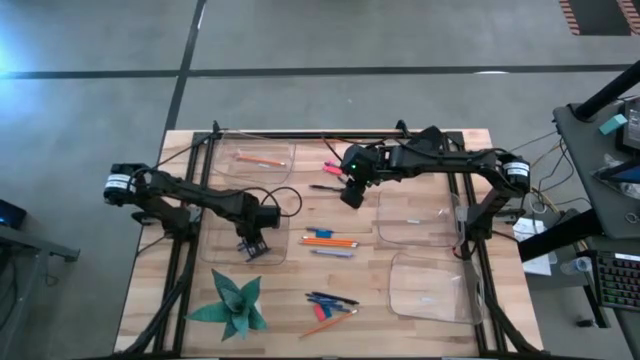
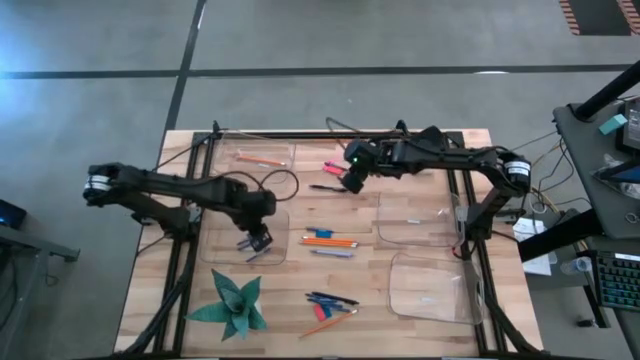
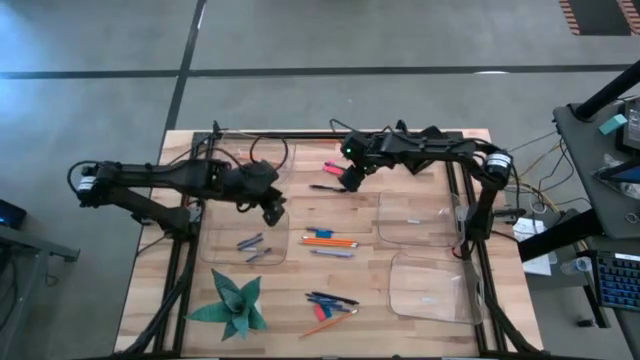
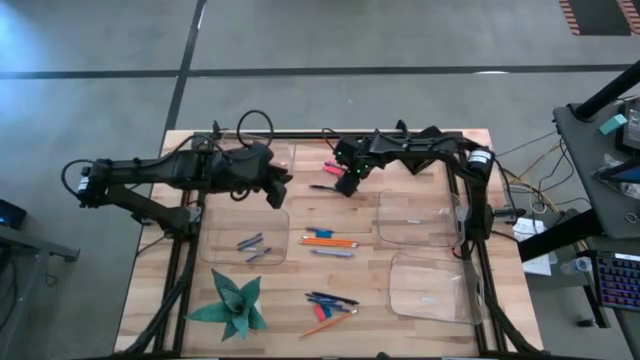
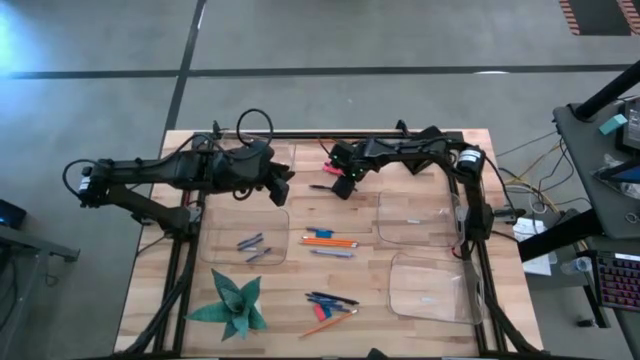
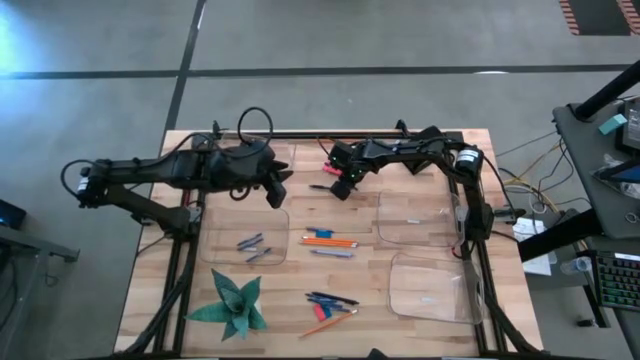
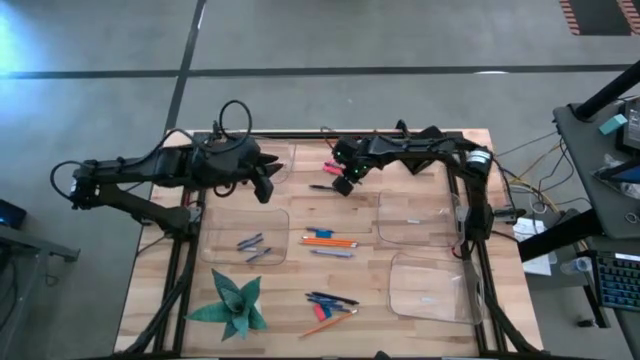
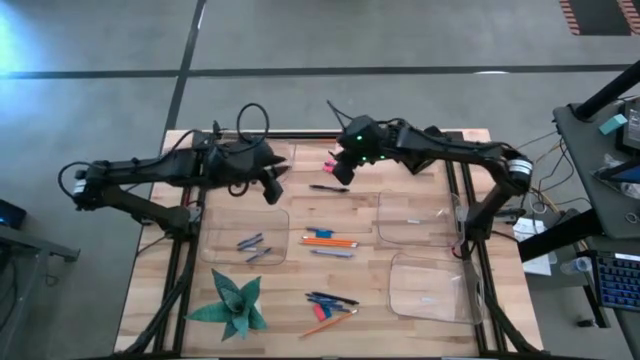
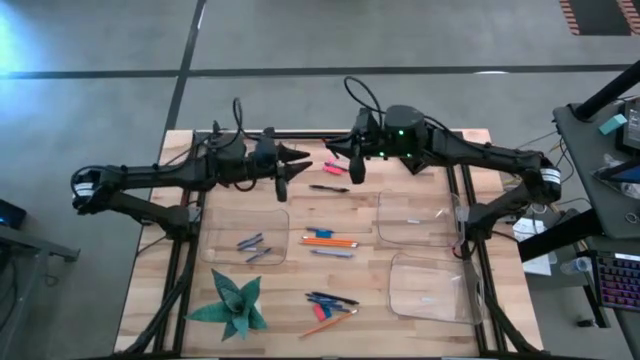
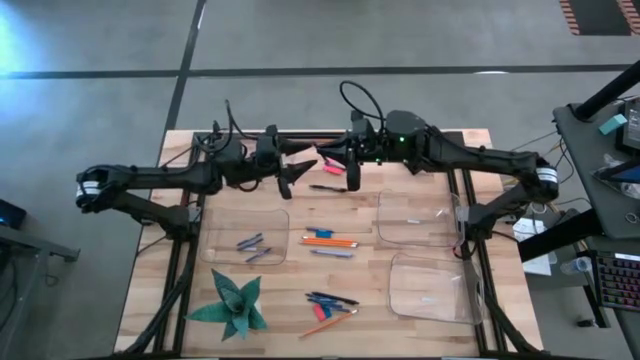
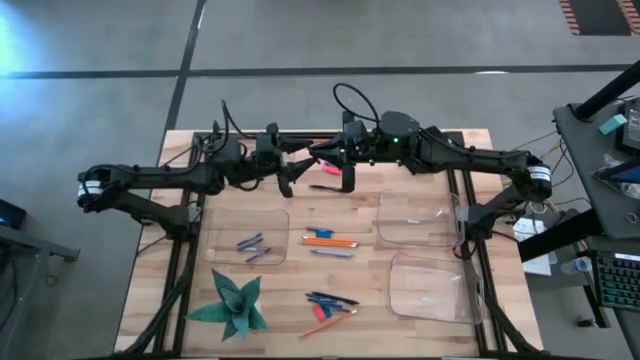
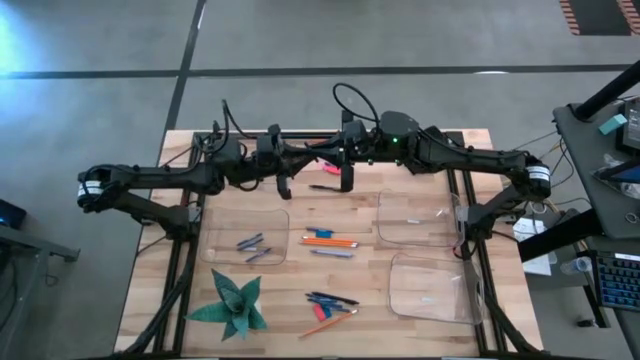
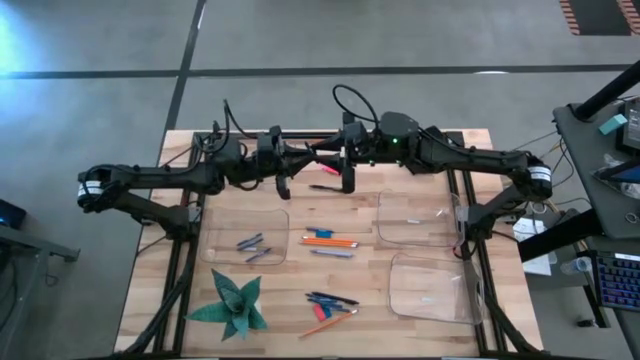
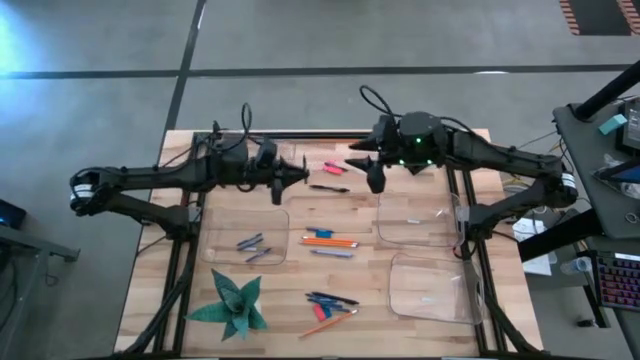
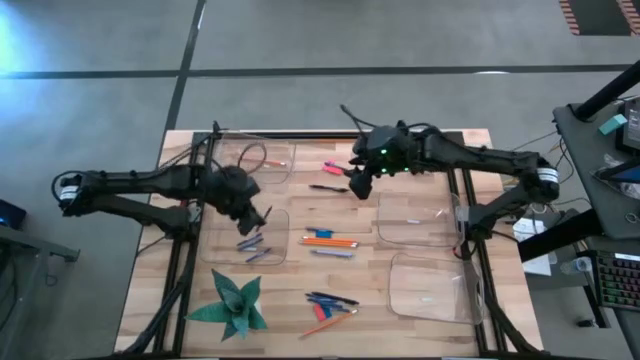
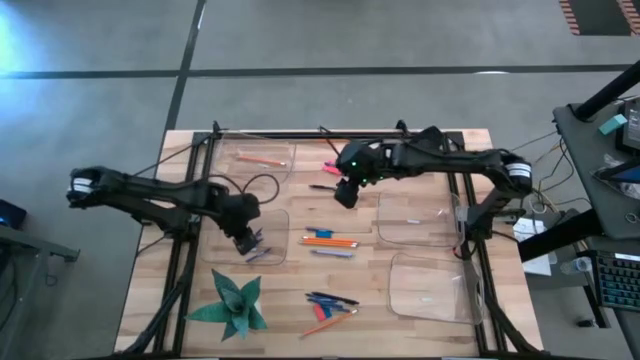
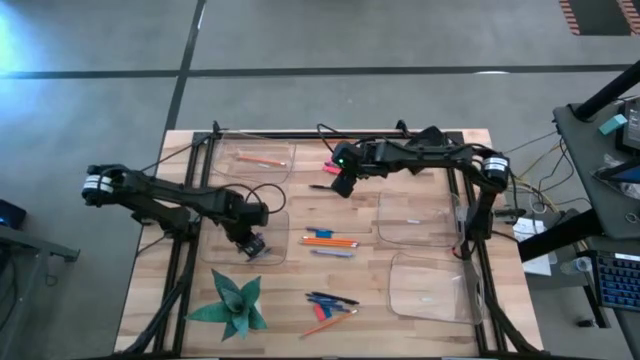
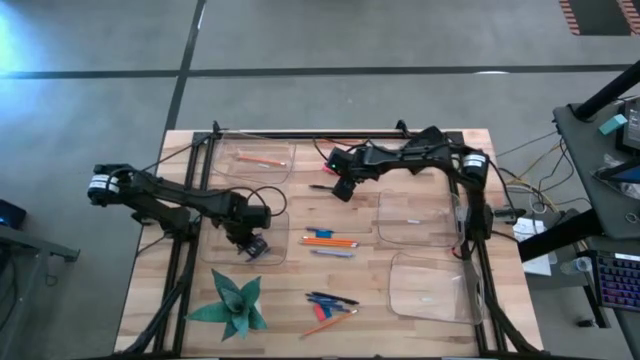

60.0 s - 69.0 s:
Task: Sort crayons/erasers/pens/pencils in bins
Put the blue crayon into the middle left transparent bin

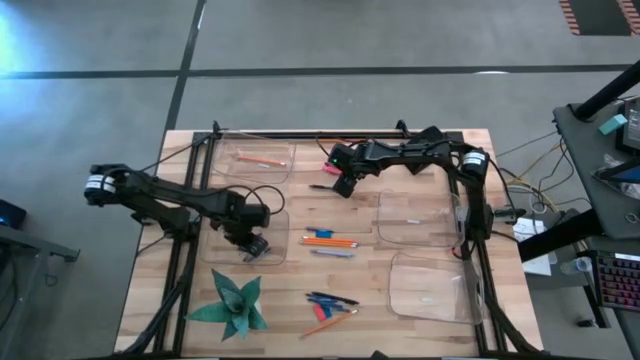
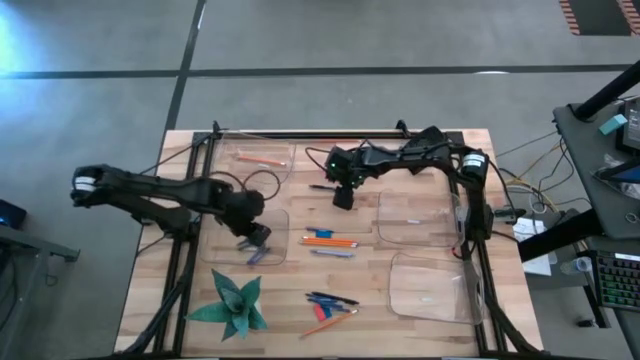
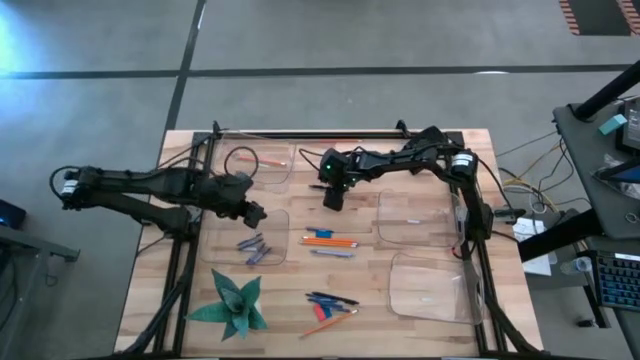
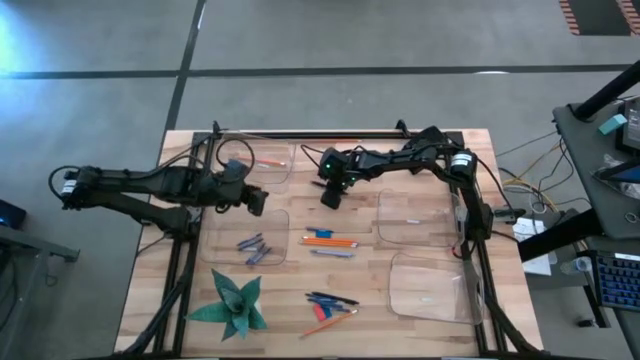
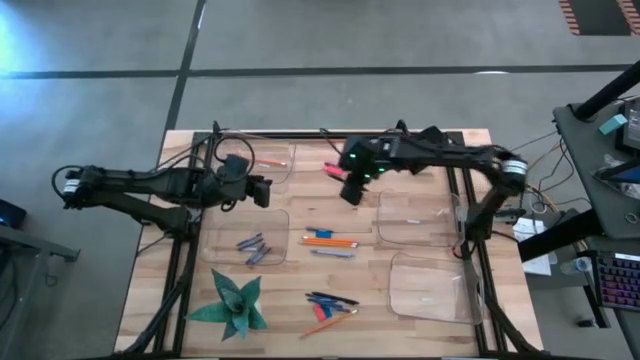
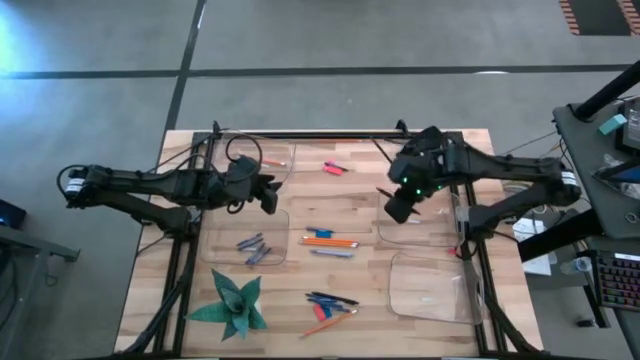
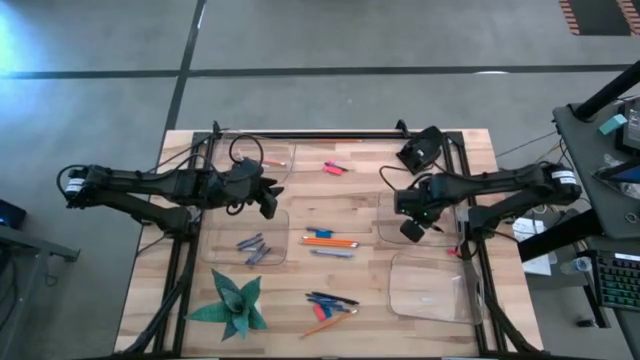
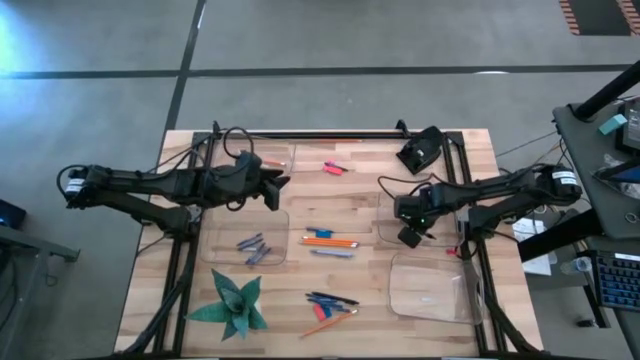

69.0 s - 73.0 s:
Put the black pen into the middle right transparent bin

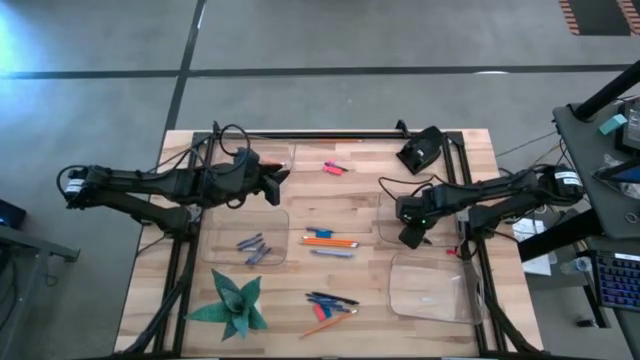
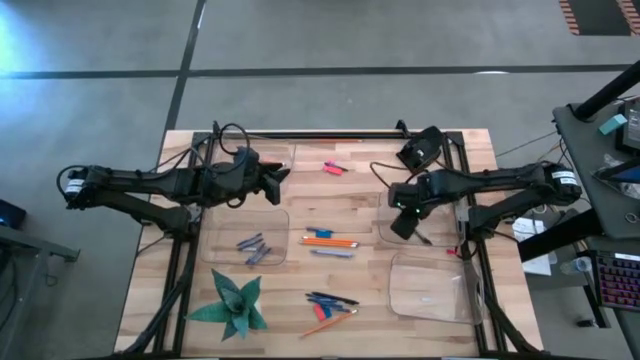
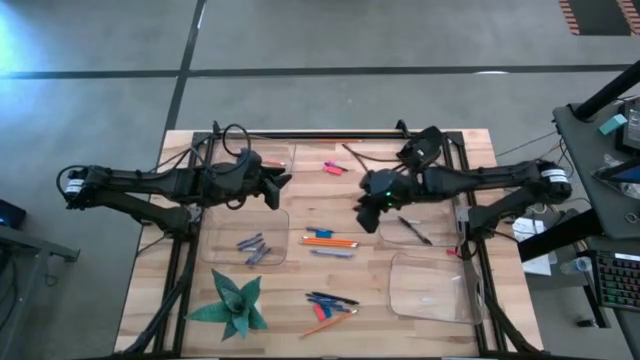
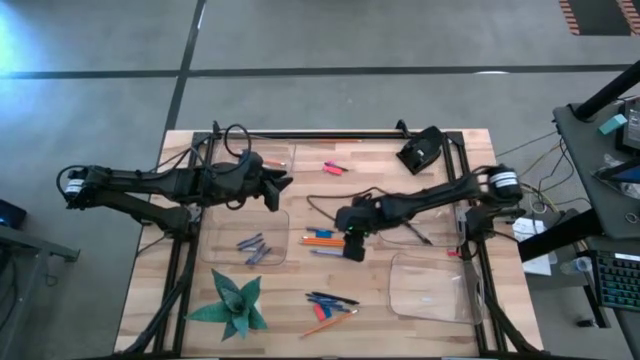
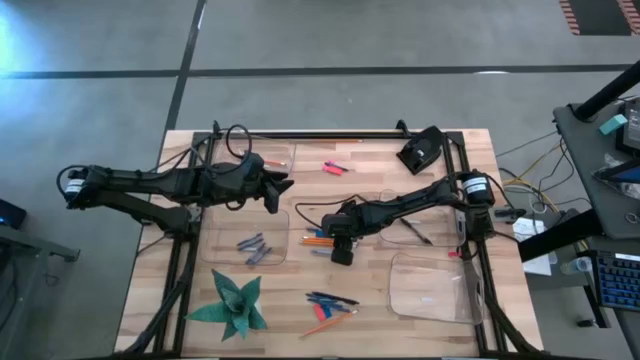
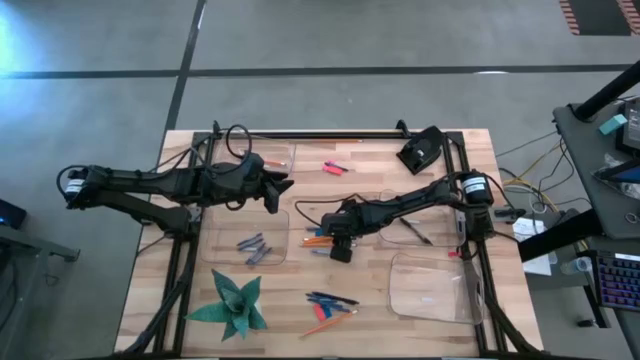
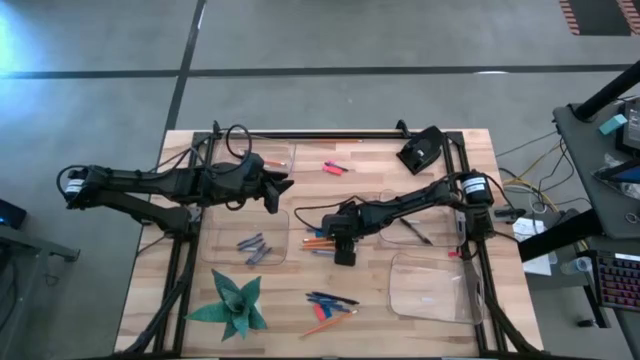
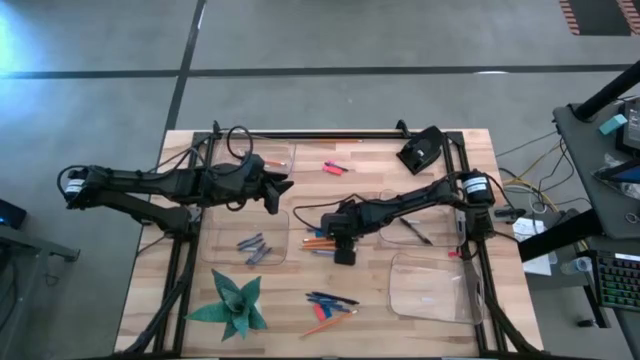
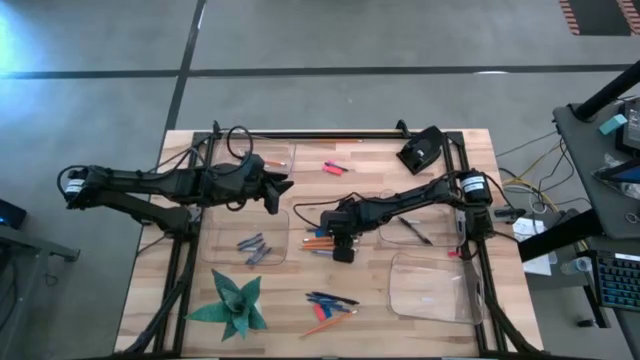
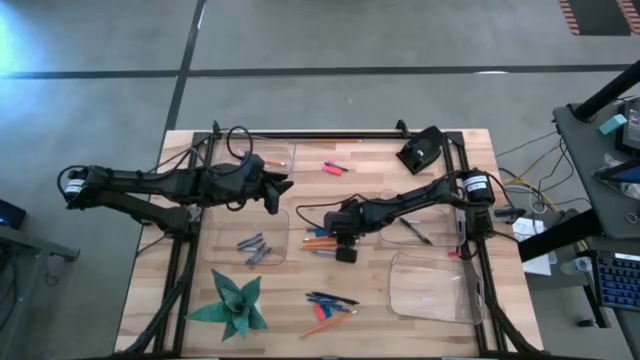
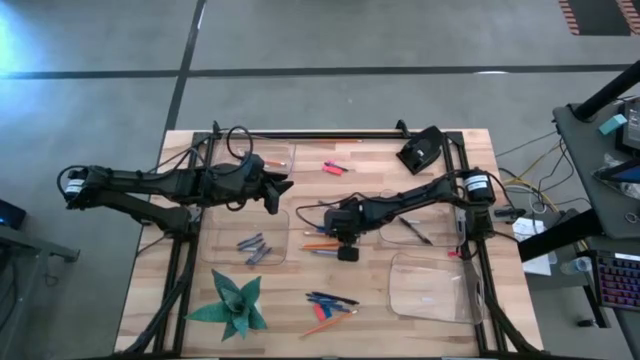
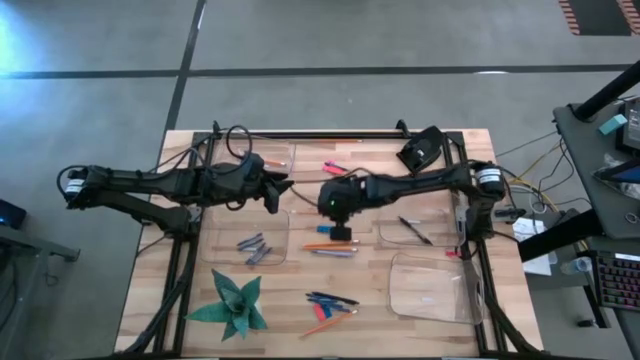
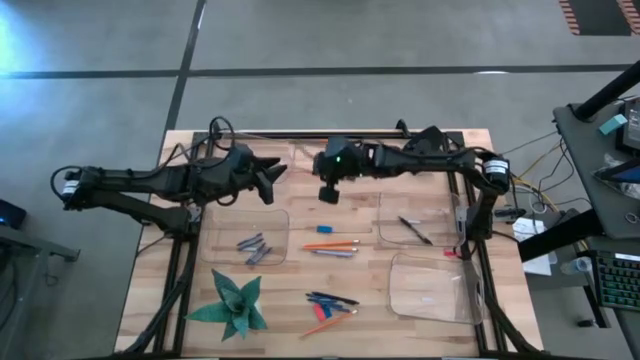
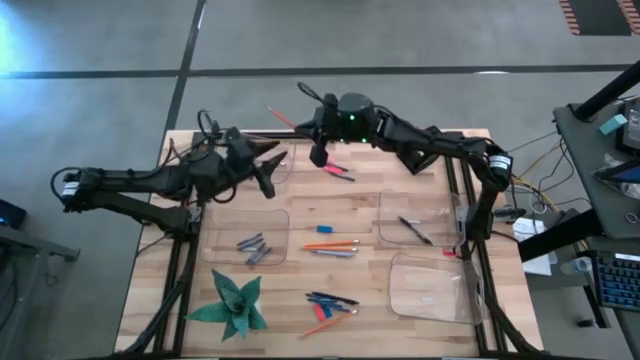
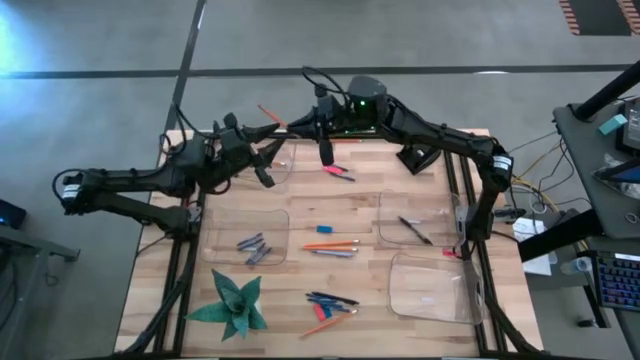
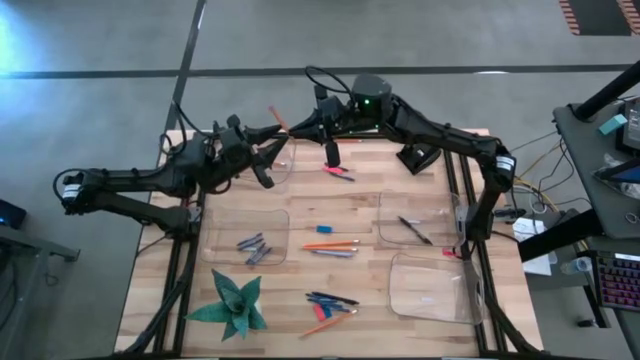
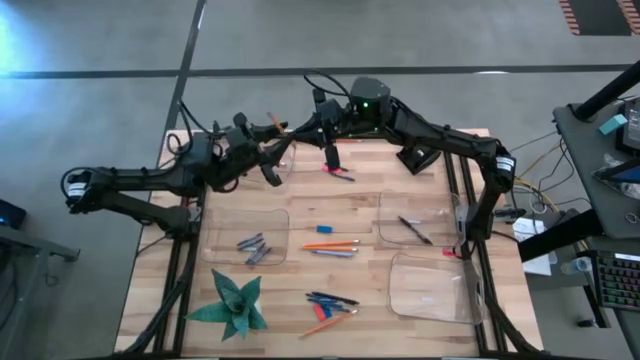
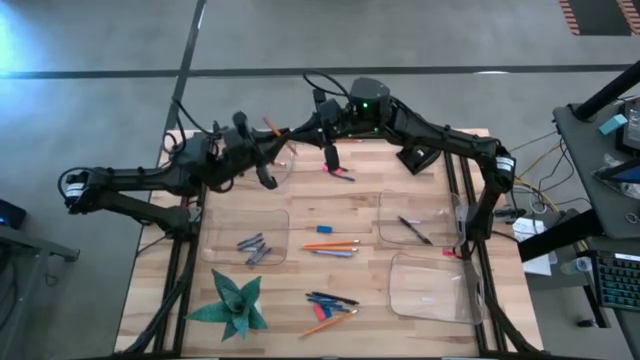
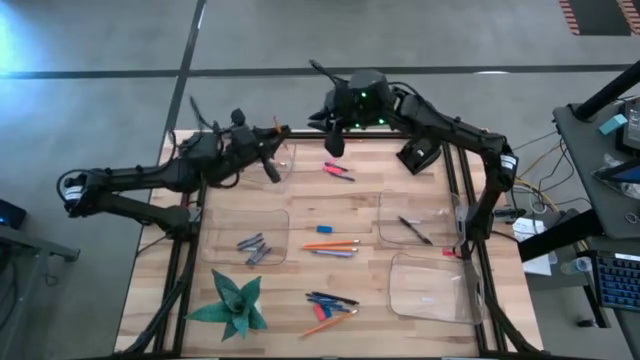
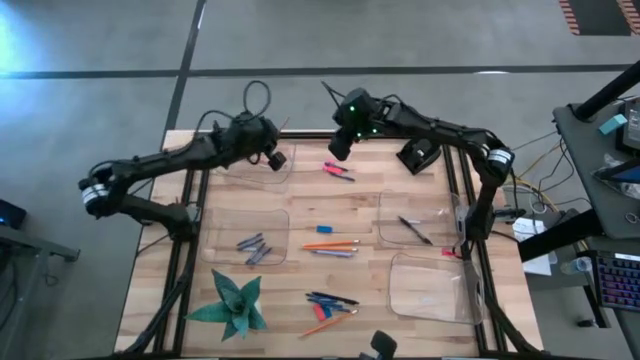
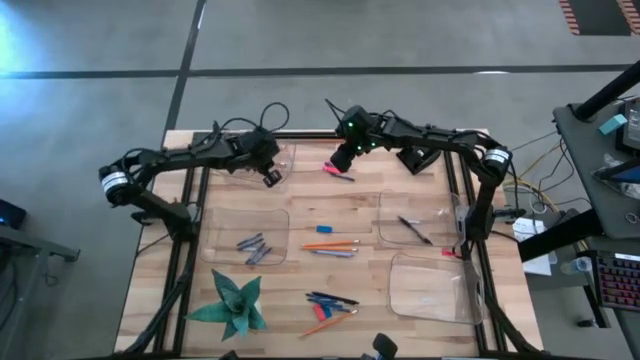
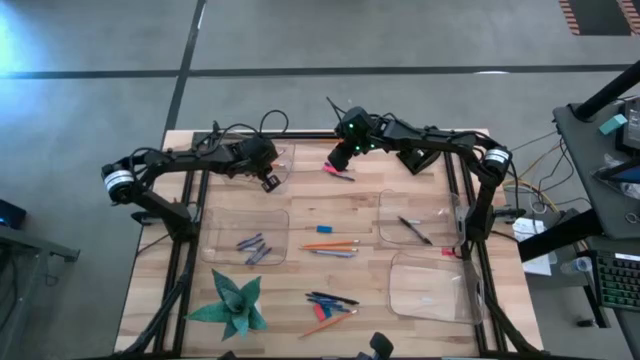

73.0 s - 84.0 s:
Put the pencil into the top left transparent bin
